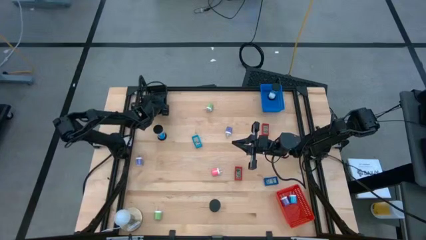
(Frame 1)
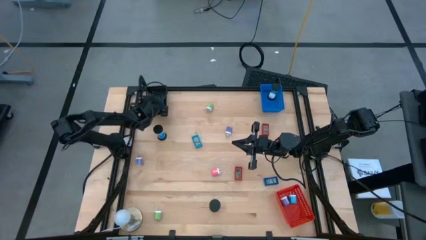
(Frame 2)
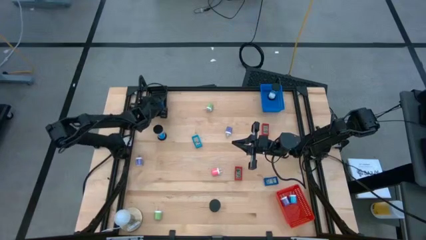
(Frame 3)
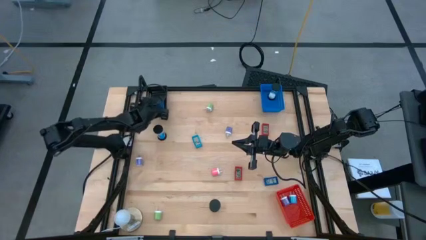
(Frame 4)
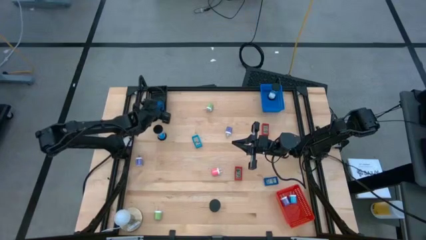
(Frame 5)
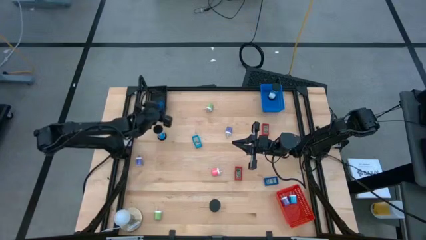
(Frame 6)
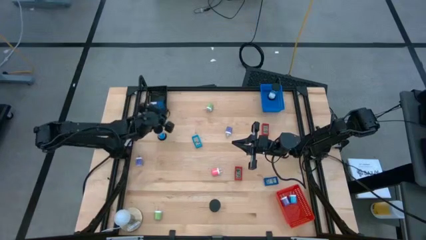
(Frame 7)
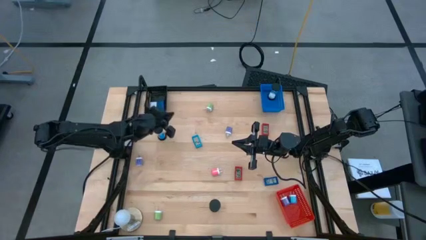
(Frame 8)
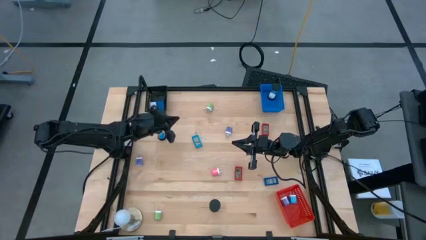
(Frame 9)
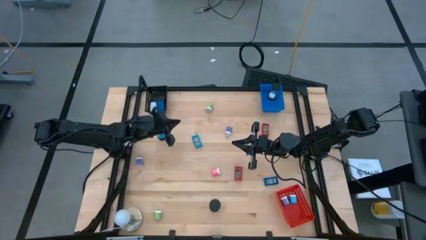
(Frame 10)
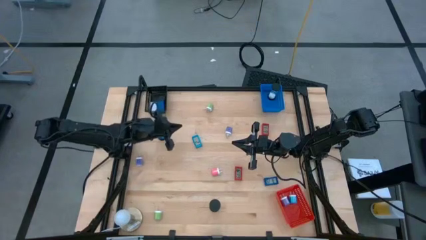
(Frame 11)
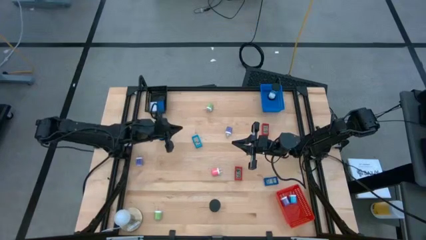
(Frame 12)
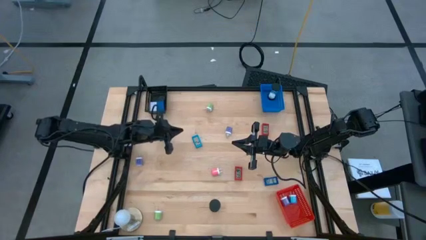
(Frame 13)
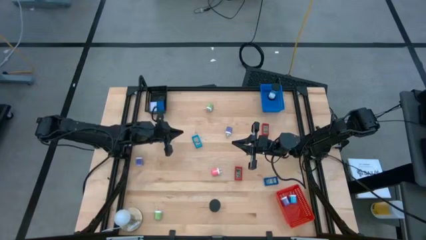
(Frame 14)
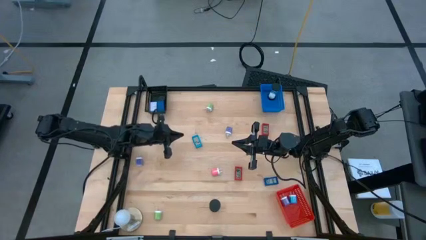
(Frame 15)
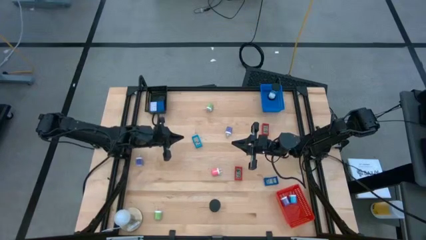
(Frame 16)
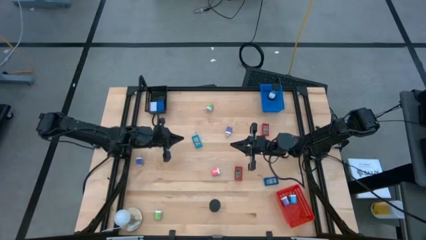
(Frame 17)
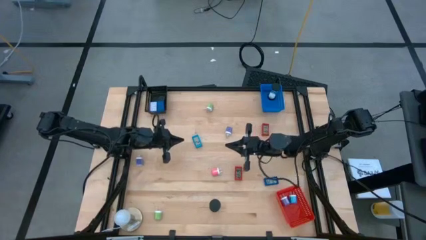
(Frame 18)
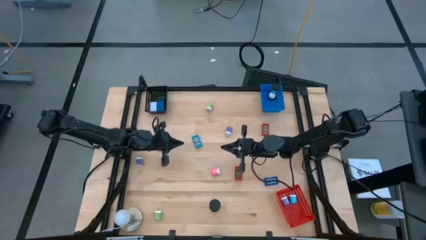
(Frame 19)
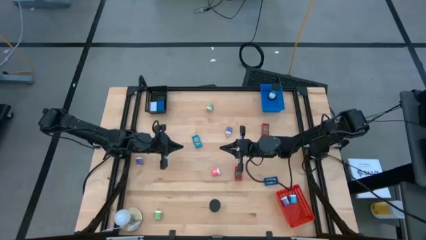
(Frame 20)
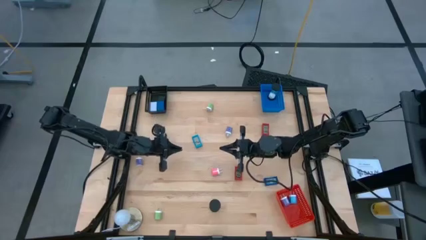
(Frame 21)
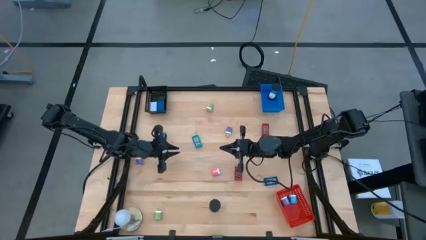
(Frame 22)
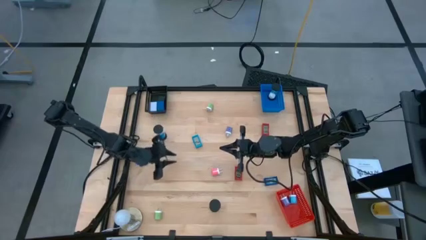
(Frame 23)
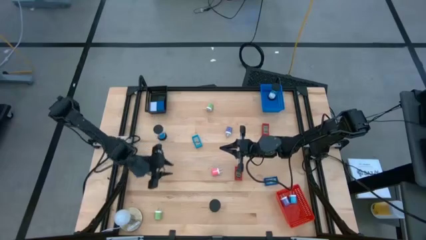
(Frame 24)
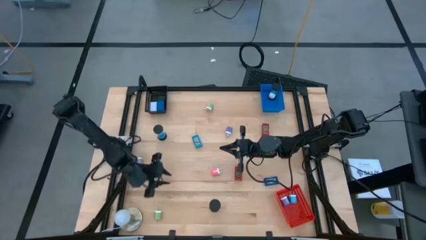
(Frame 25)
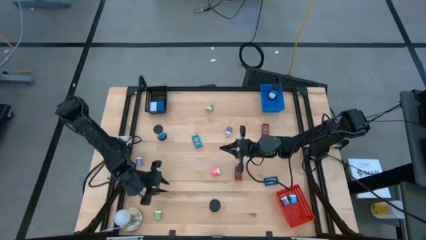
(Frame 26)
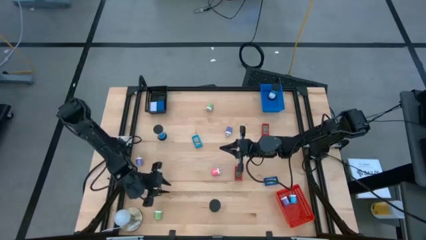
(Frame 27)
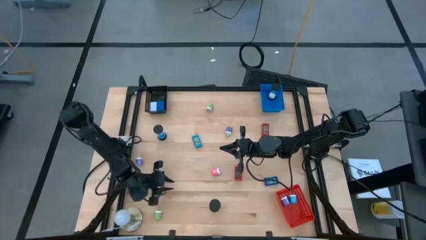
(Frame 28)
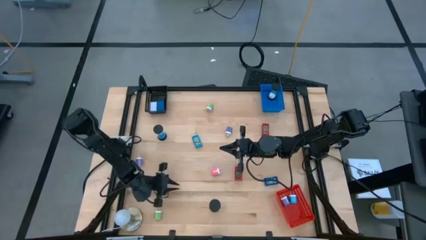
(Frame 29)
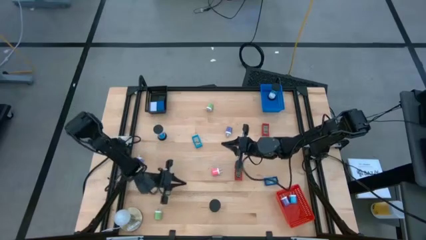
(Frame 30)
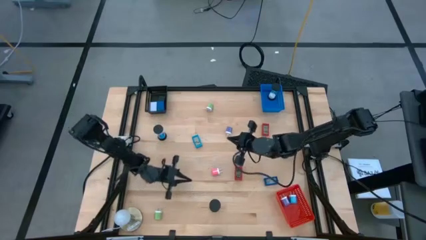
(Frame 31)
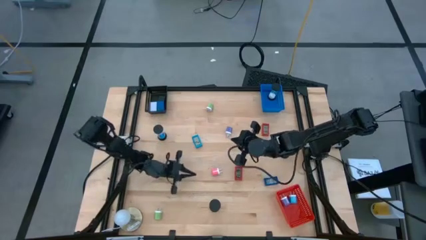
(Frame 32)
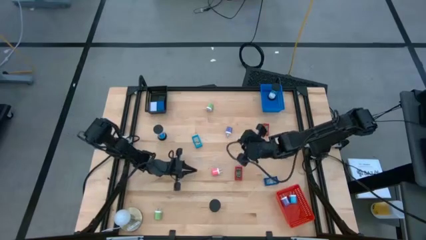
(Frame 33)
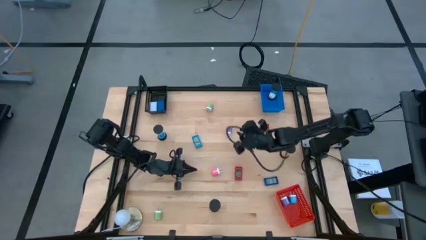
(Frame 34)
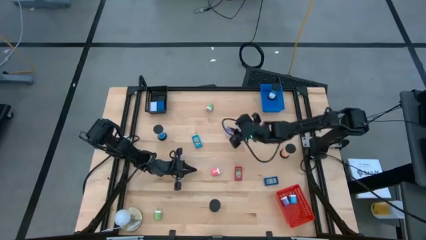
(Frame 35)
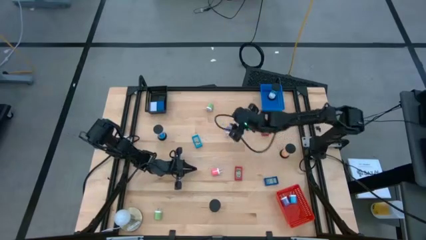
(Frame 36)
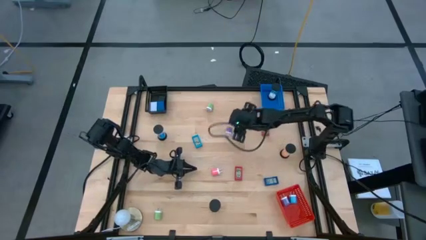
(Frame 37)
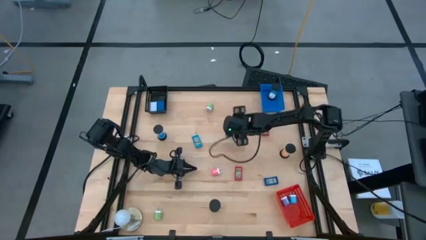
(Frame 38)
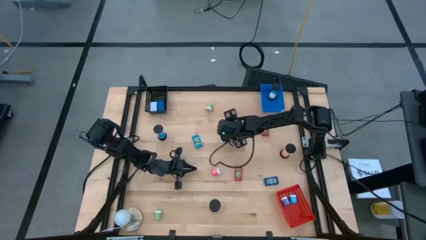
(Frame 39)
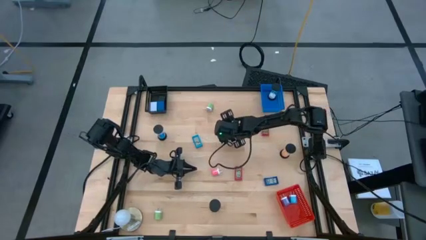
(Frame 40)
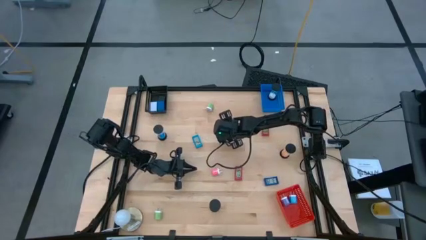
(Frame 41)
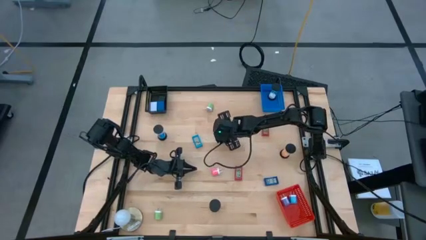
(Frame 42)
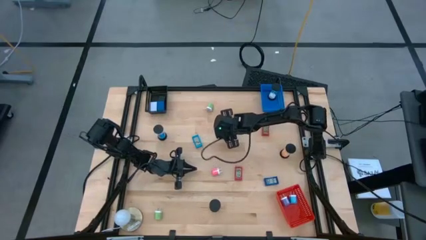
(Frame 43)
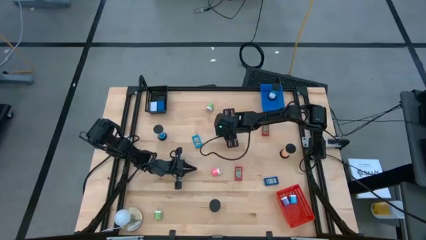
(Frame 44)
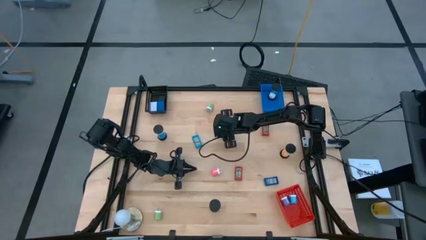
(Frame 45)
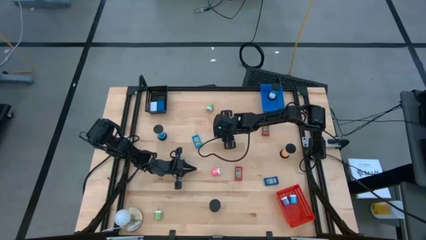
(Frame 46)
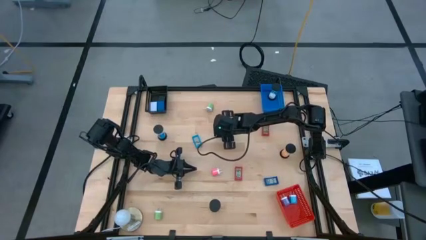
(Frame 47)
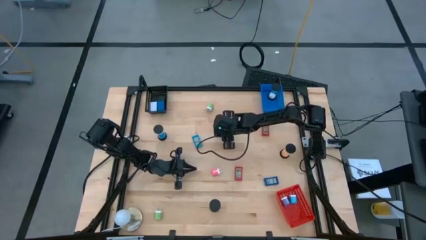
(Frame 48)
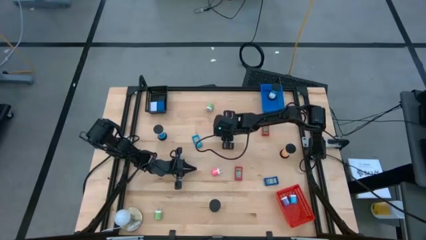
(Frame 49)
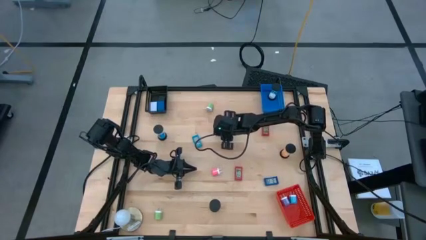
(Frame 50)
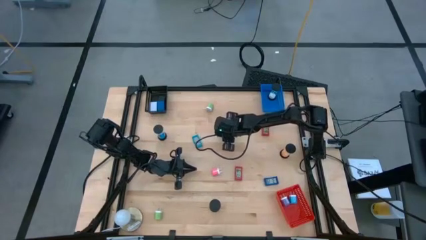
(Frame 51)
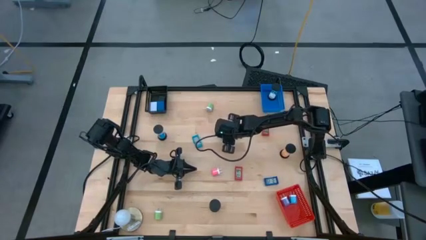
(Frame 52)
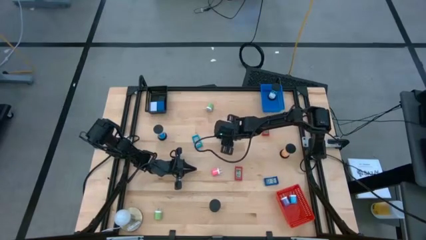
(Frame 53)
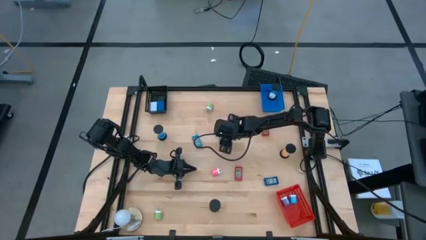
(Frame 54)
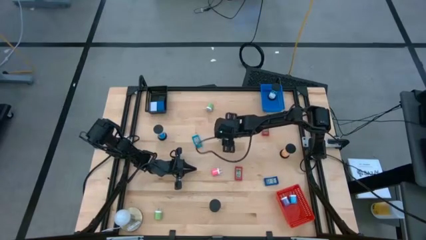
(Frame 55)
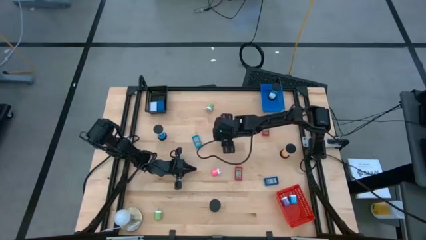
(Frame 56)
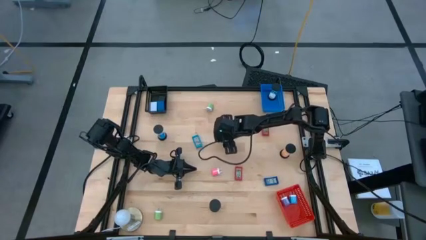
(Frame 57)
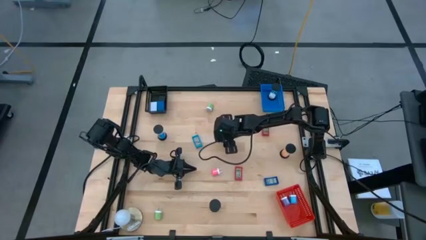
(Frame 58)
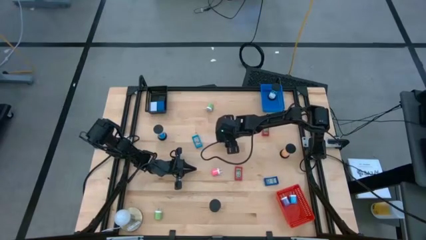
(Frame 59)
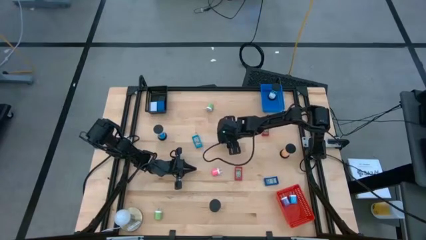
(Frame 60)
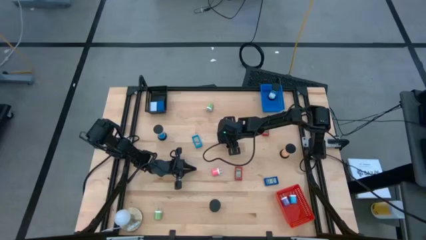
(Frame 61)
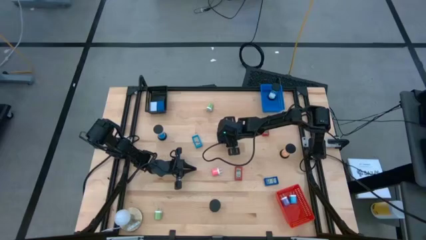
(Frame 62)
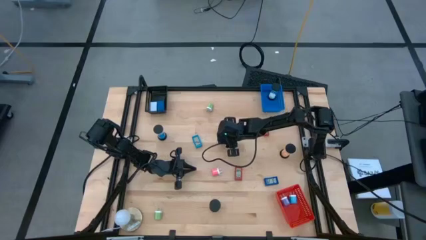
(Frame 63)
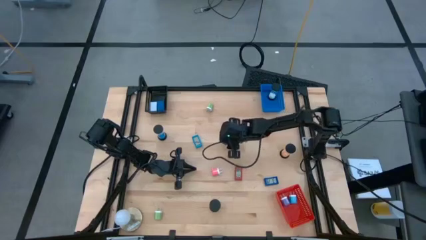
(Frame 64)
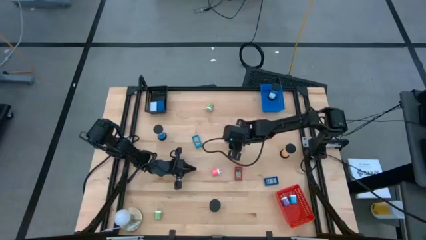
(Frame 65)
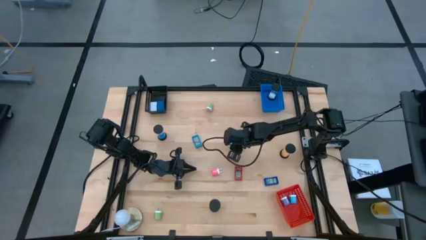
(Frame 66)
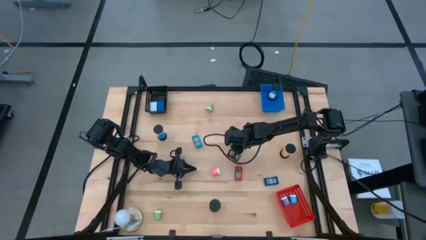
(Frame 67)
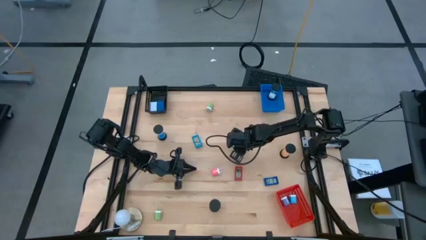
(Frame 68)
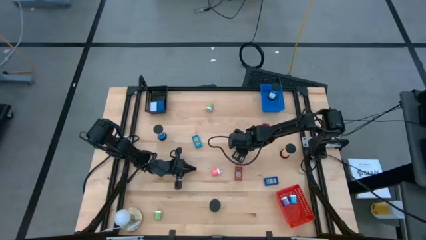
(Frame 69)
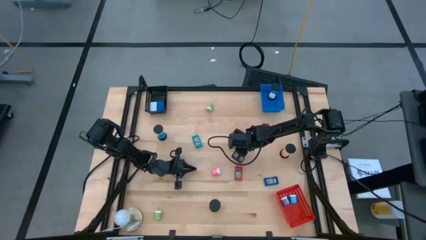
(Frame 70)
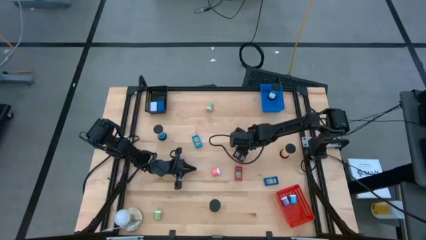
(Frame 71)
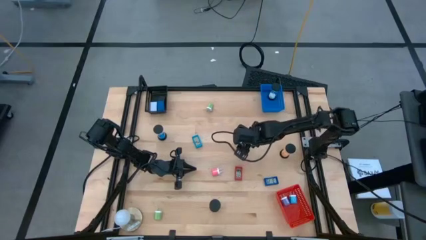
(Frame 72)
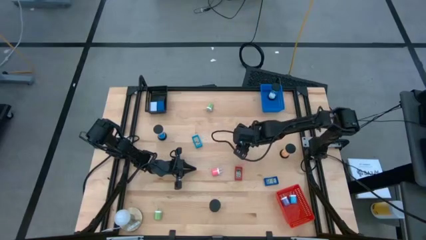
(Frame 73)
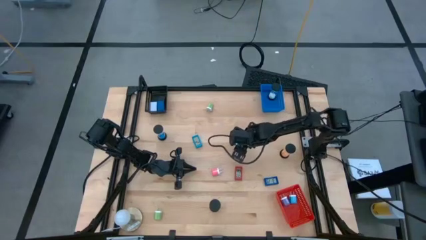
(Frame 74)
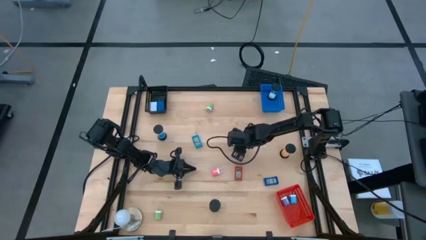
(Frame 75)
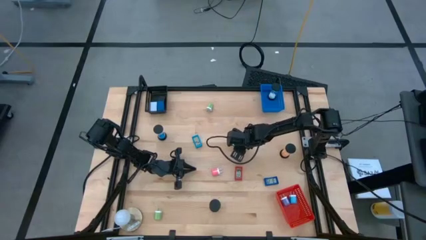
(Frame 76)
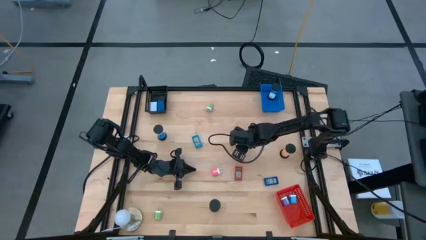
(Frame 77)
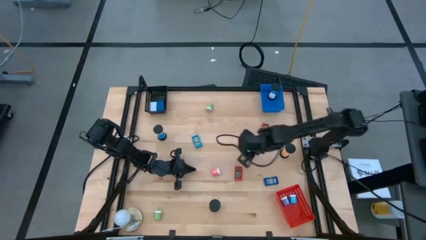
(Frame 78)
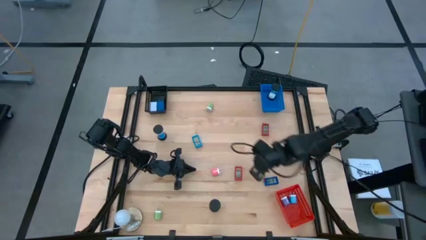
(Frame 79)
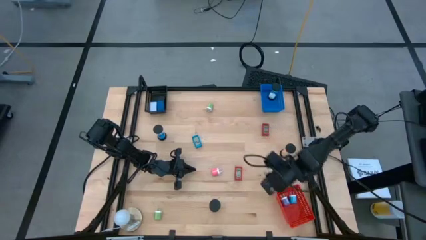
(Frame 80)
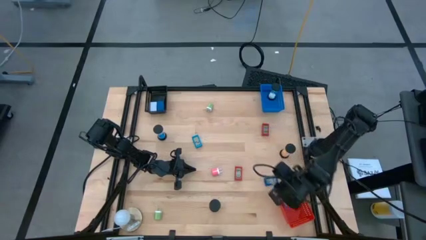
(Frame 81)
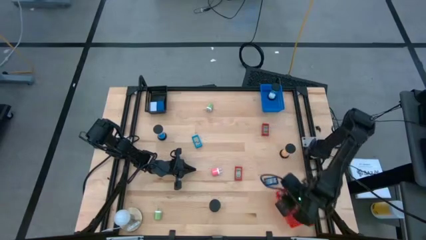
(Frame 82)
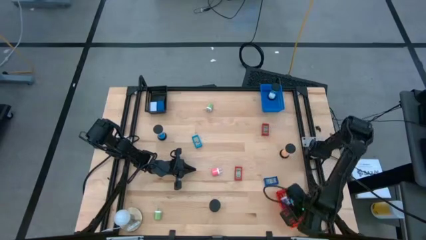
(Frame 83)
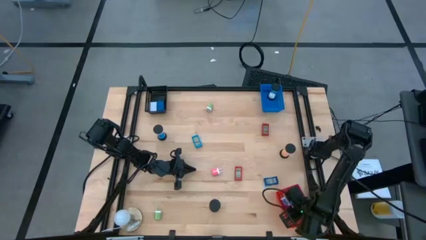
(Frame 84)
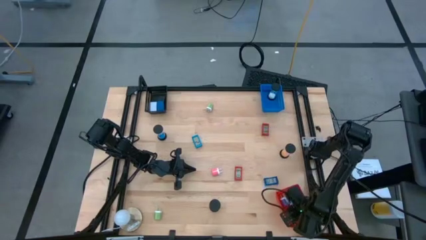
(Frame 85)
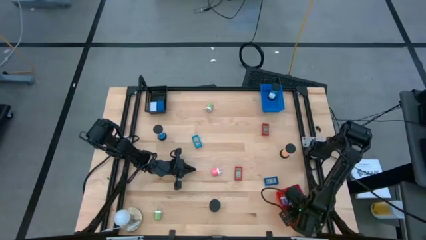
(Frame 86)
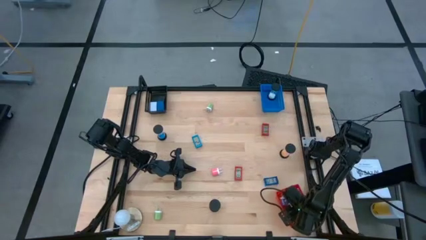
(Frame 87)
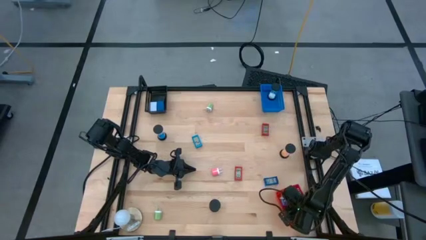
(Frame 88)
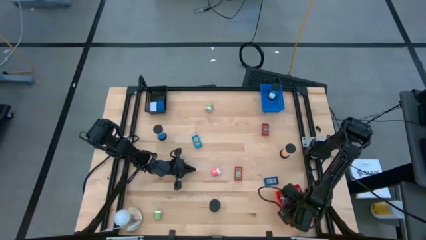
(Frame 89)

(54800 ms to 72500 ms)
Task: Pick & Place Office items
Put the right blue charger adapter into the red basket
